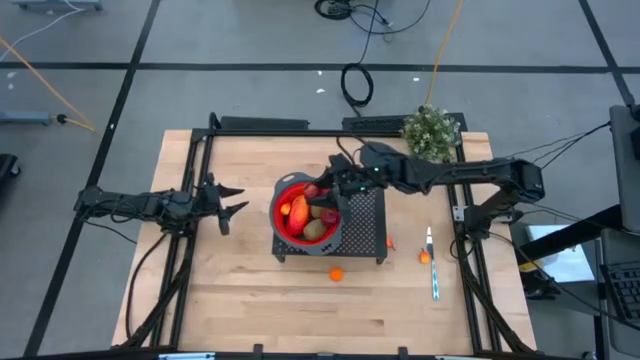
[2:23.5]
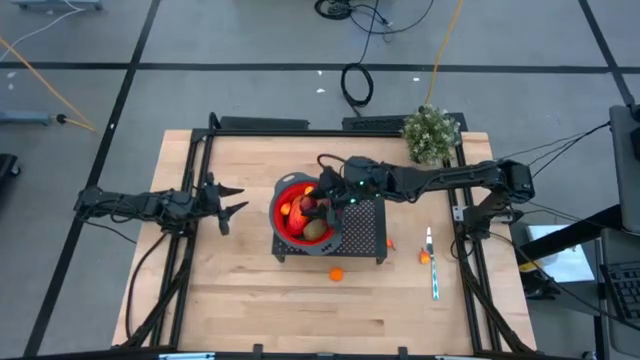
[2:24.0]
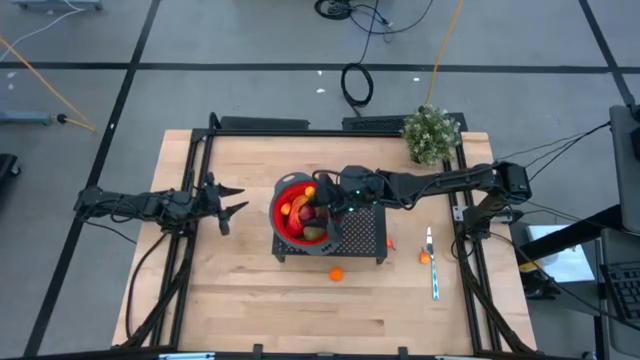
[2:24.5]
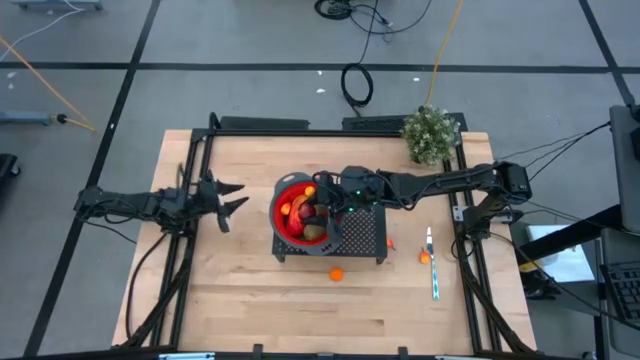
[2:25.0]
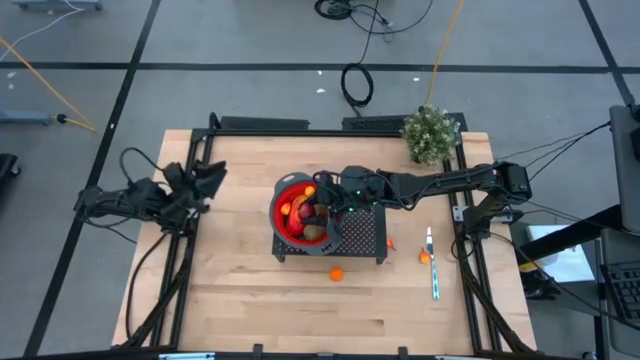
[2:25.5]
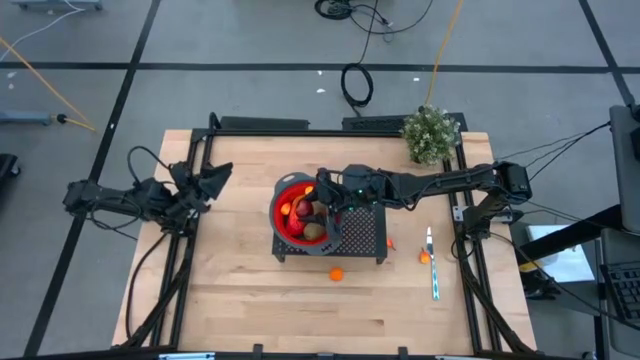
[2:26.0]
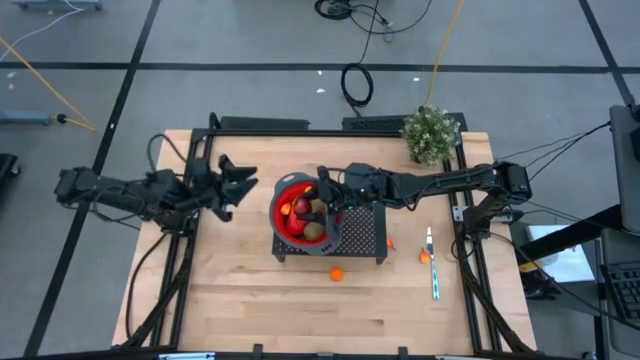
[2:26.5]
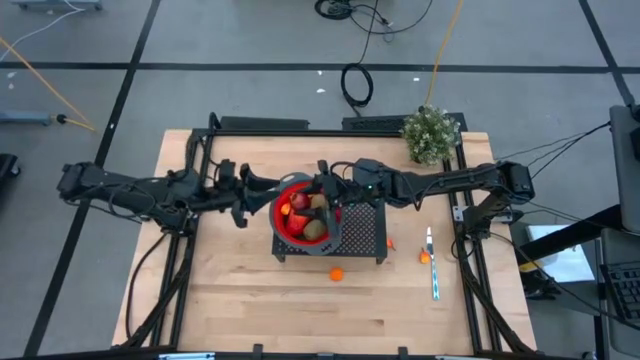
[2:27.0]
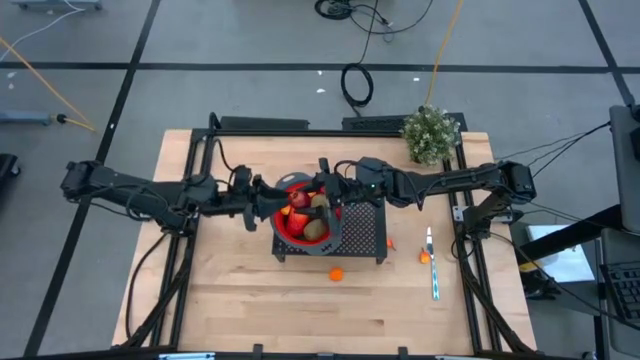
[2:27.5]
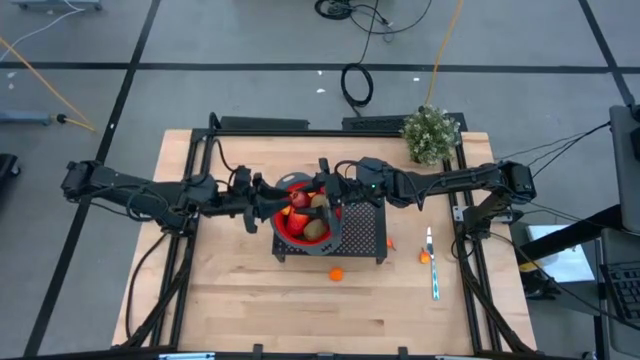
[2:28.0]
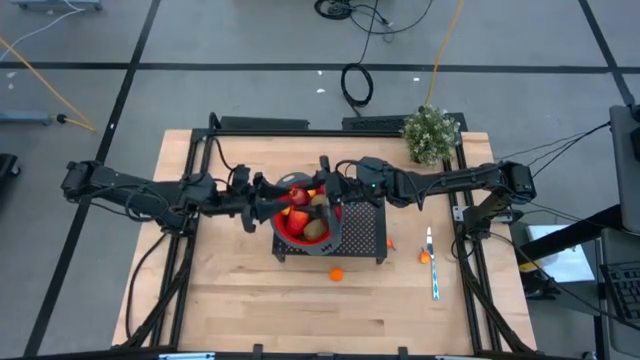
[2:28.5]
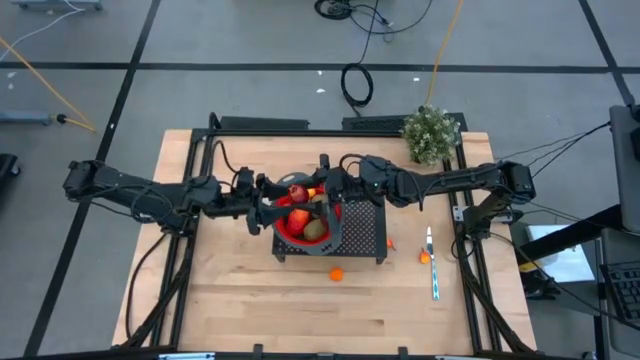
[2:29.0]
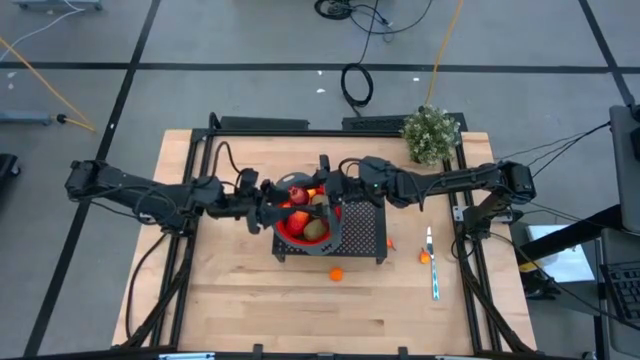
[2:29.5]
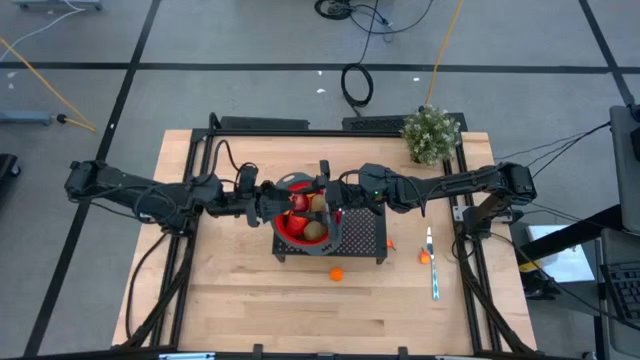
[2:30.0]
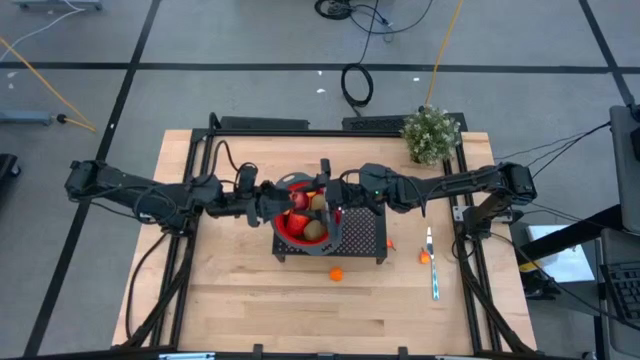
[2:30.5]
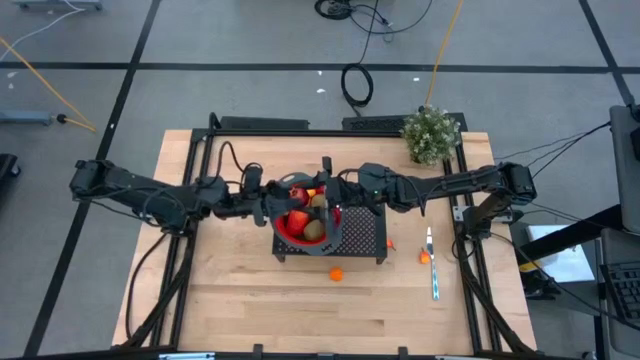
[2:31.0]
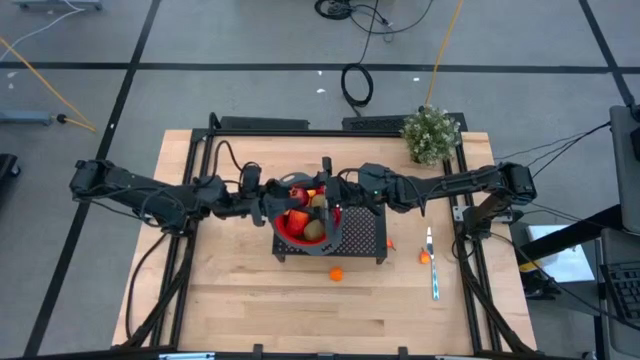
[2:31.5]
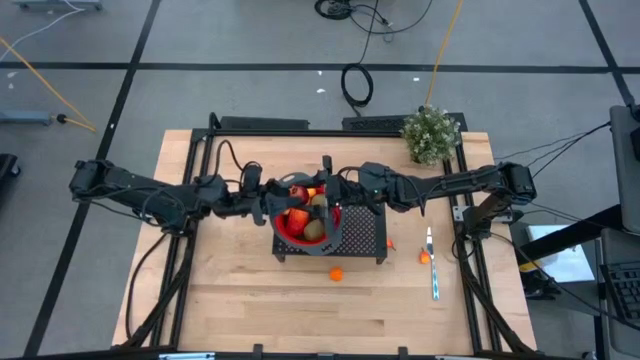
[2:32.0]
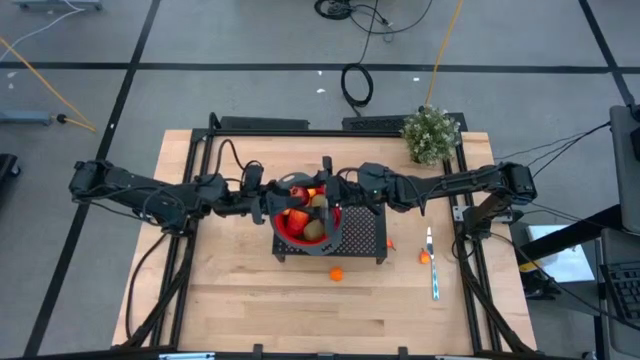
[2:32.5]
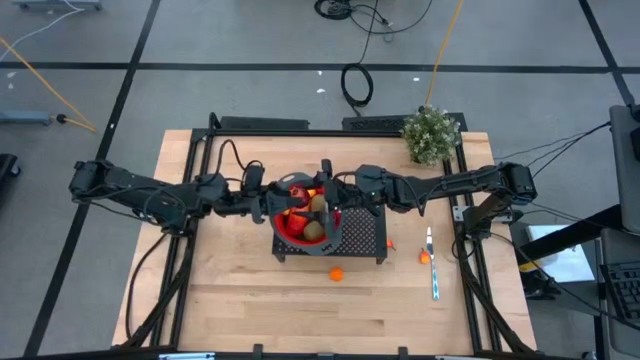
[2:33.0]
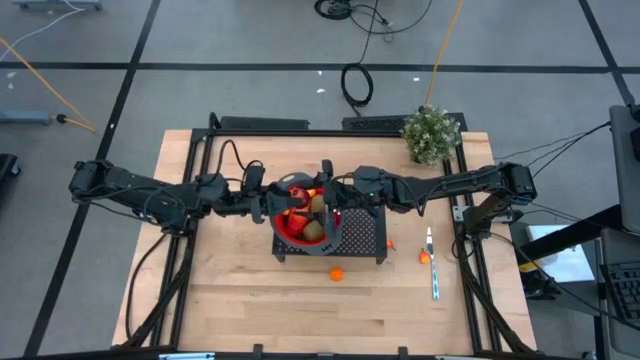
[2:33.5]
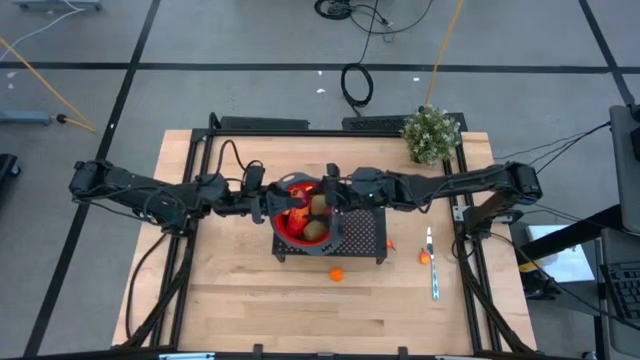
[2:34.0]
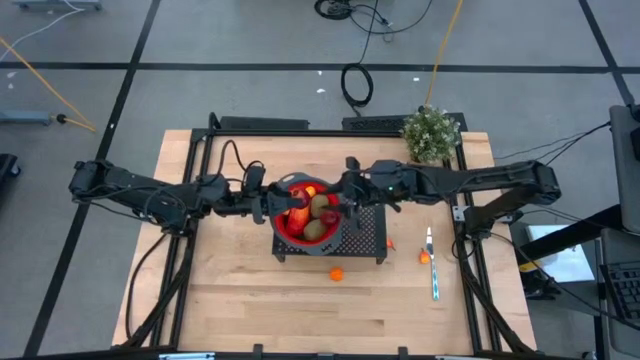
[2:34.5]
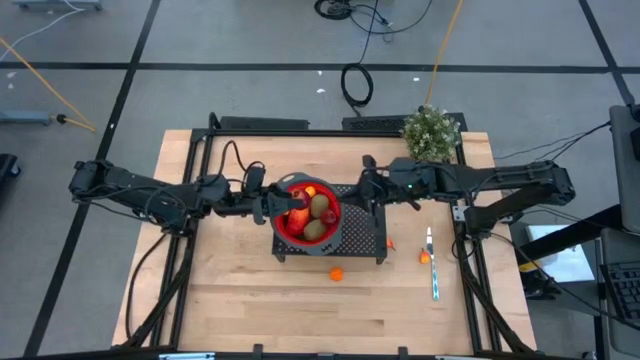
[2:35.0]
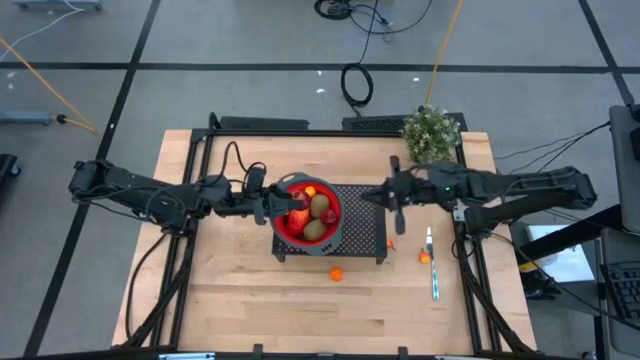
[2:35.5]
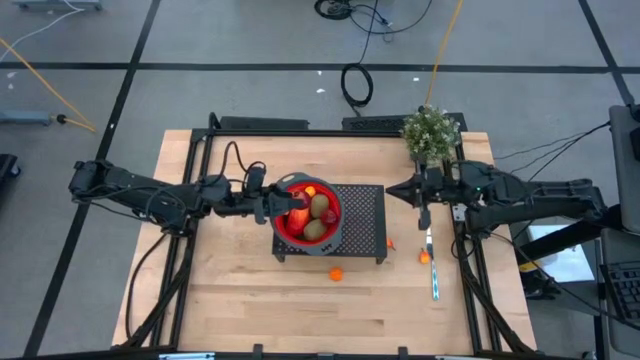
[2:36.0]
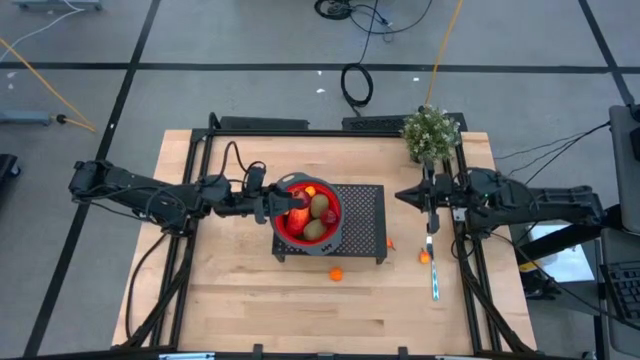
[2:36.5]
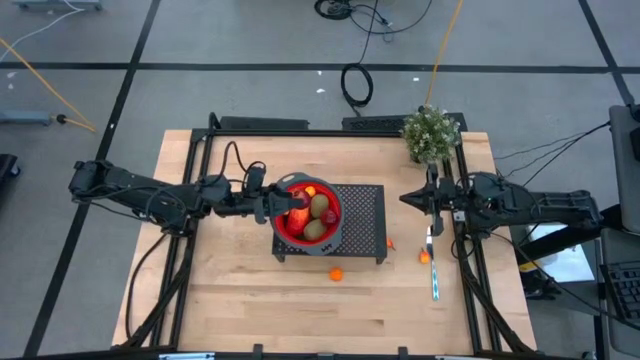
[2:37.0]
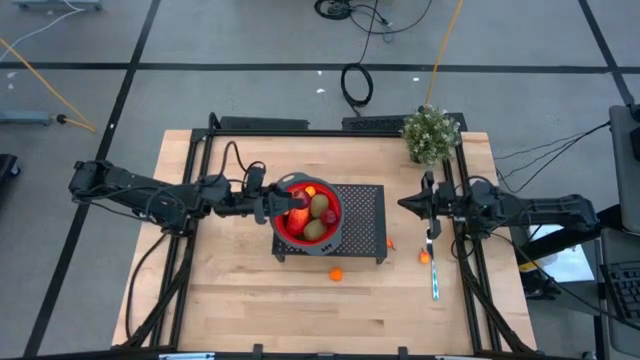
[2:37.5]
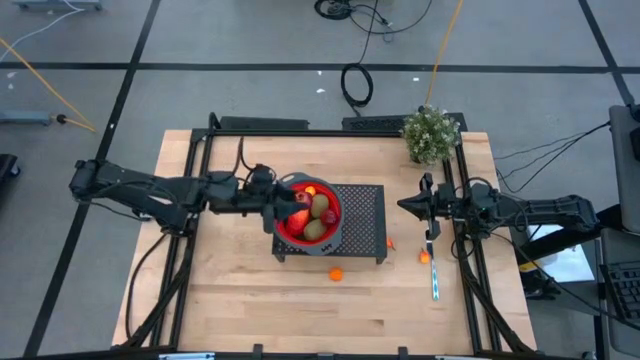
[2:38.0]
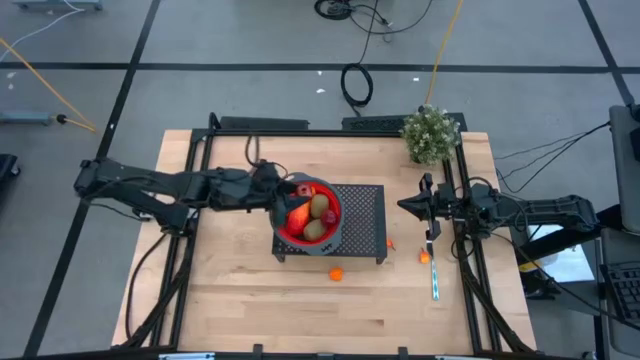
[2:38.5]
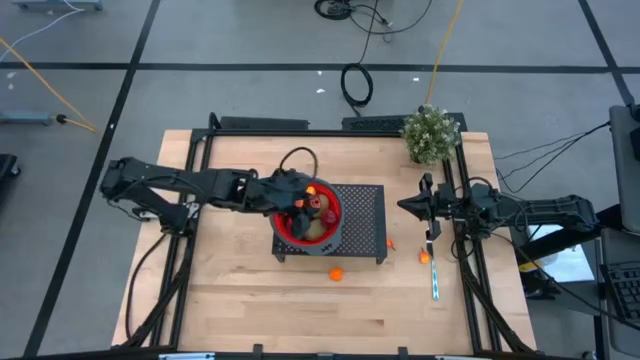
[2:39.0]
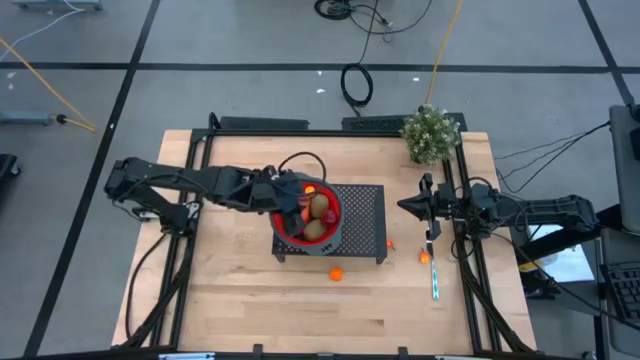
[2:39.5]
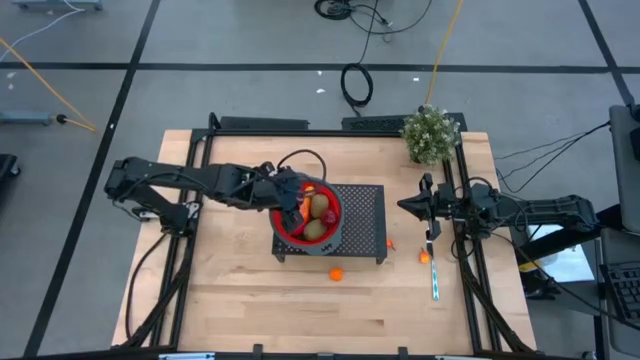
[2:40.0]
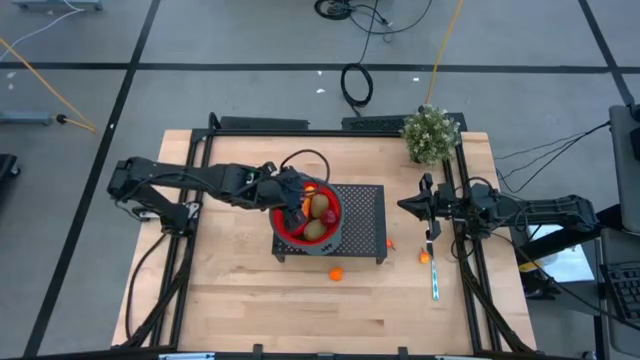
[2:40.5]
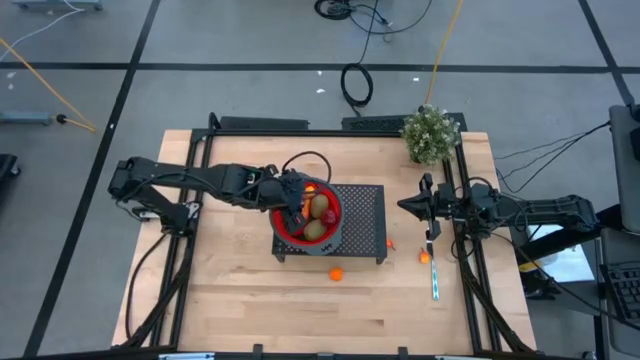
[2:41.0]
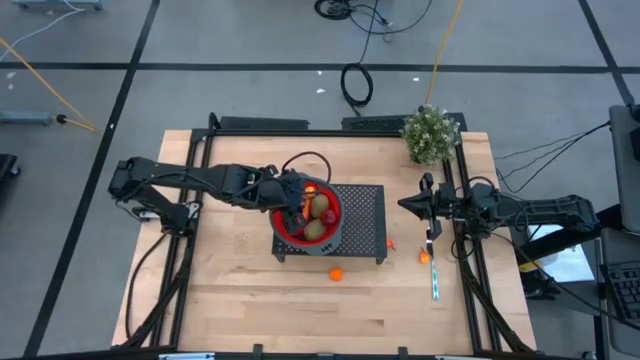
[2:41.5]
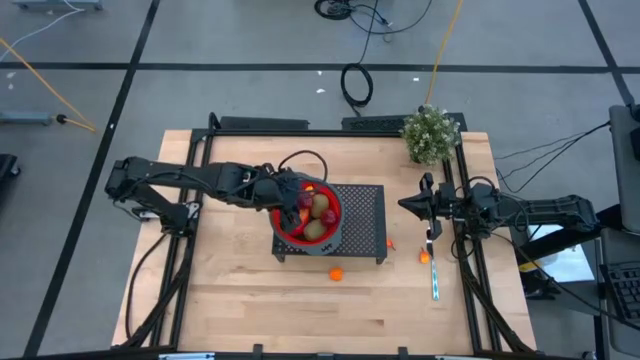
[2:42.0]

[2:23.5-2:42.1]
Task: Pick & Place Fruit
Put the pomegranate into the red colander on the shelf

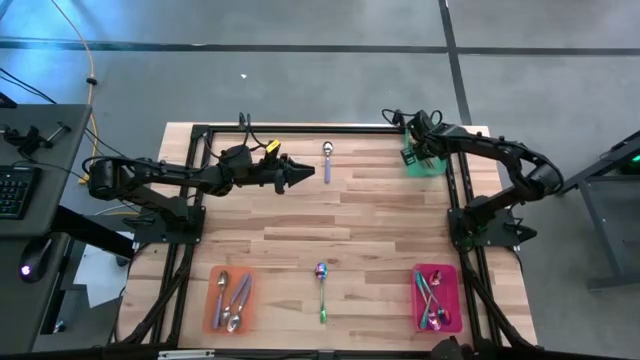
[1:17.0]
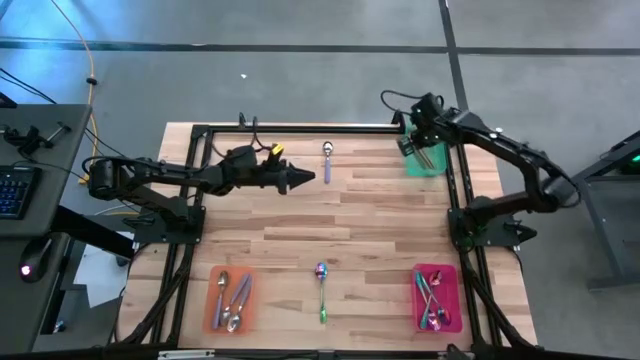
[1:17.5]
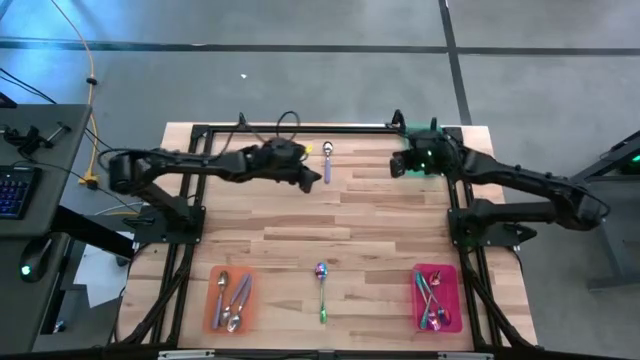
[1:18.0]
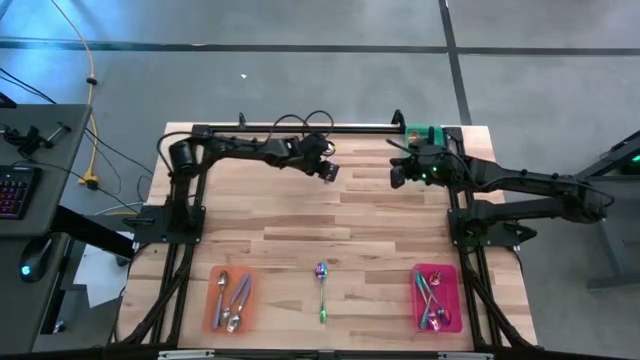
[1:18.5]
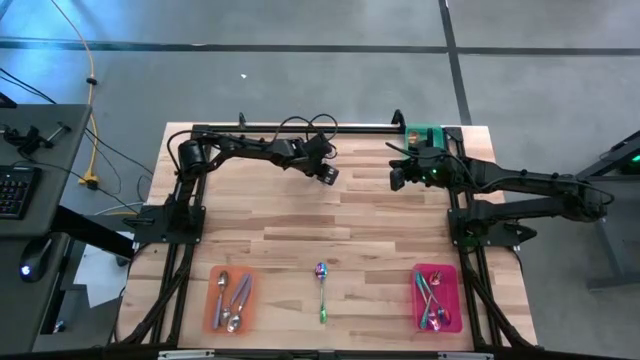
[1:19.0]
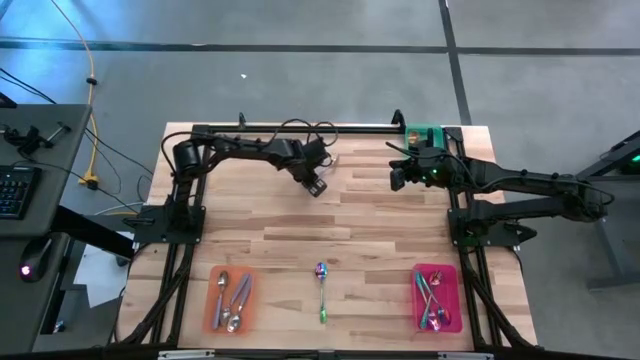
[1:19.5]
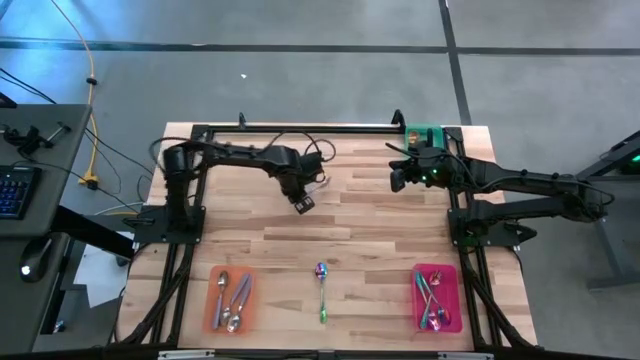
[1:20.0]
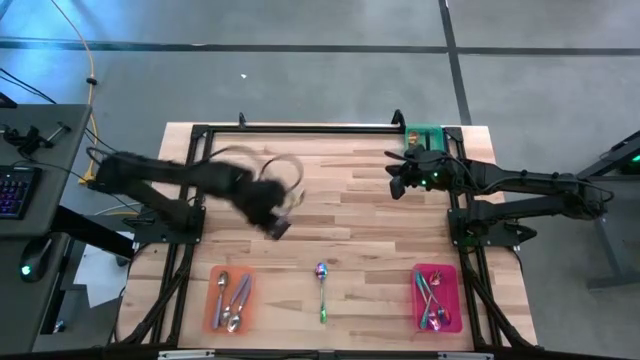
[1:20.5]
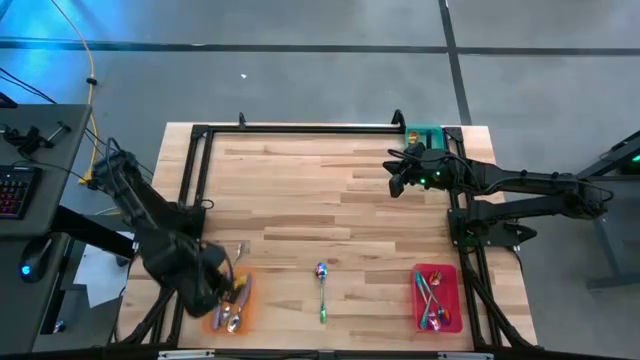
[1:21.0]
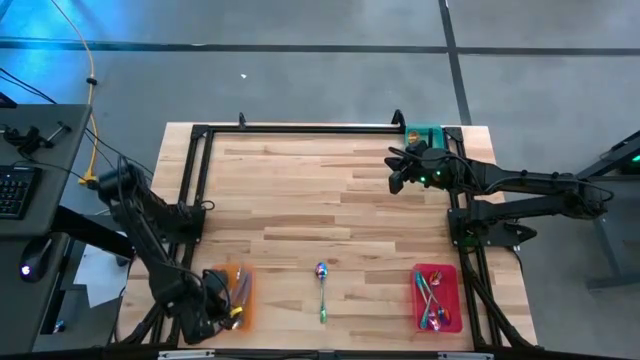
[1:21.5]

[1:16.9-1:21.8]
Task: Sort silverware by color (type)
Put the purple spoon into the orange bin
